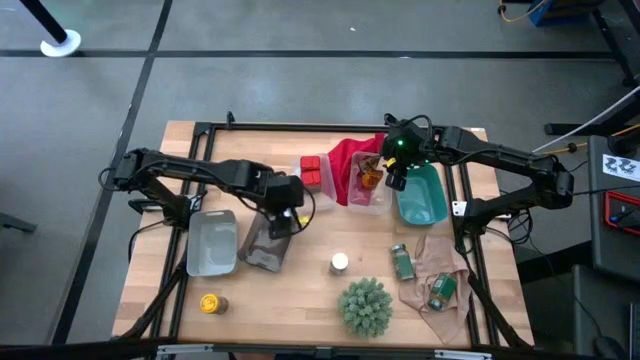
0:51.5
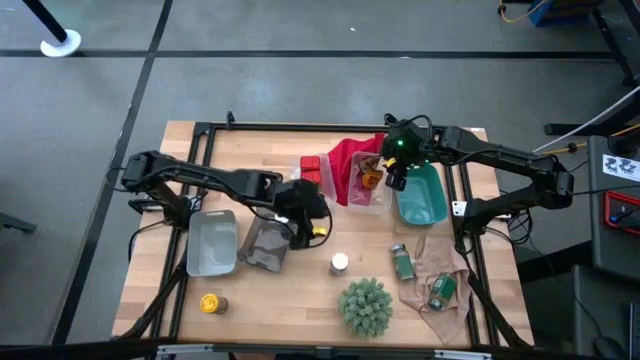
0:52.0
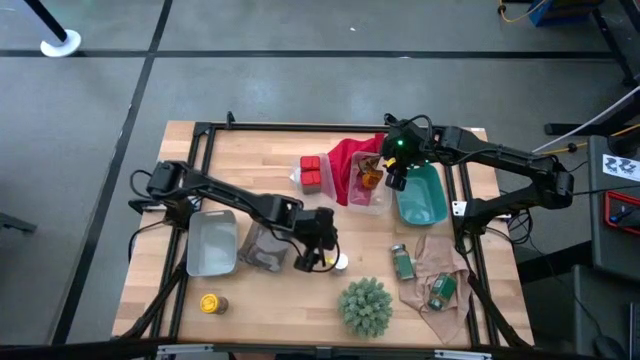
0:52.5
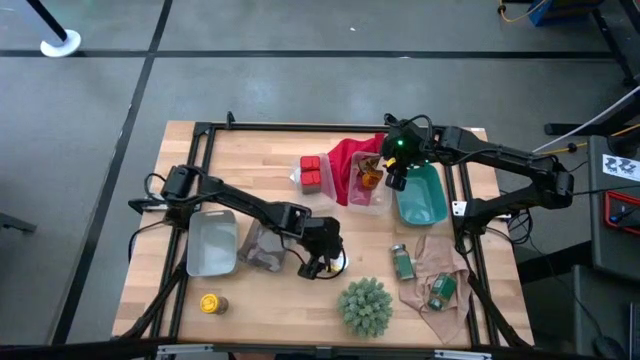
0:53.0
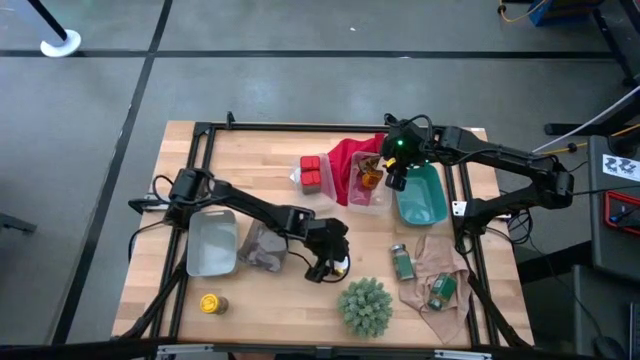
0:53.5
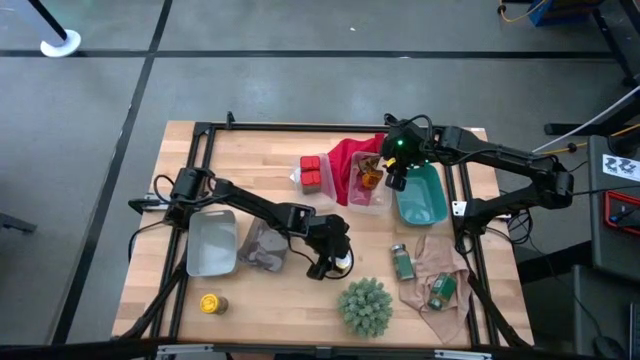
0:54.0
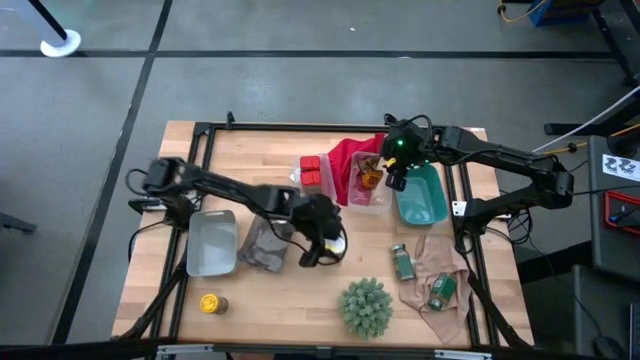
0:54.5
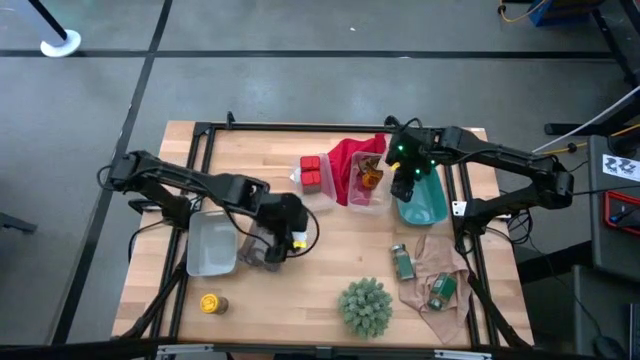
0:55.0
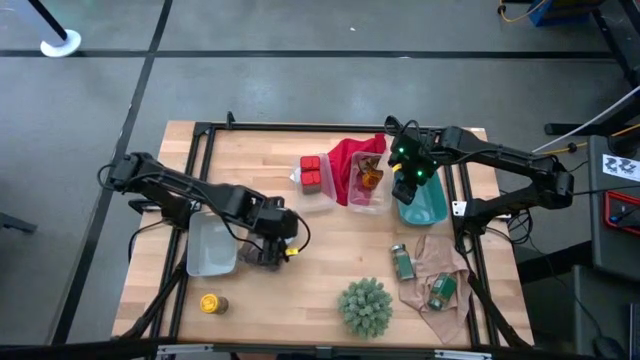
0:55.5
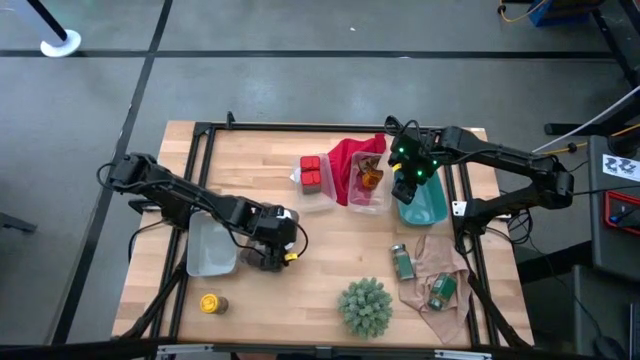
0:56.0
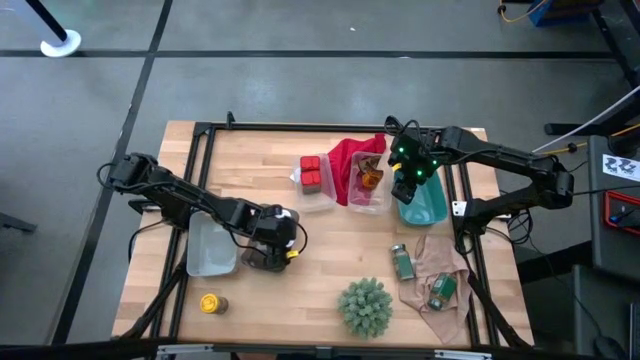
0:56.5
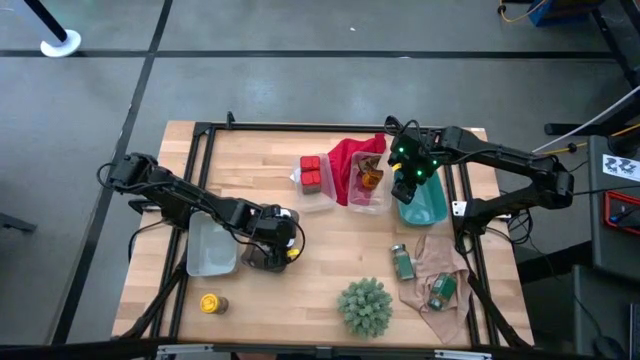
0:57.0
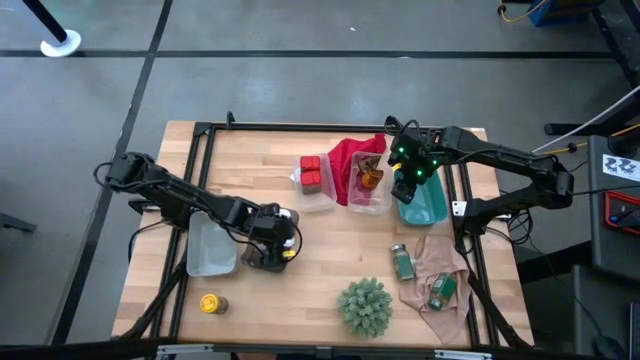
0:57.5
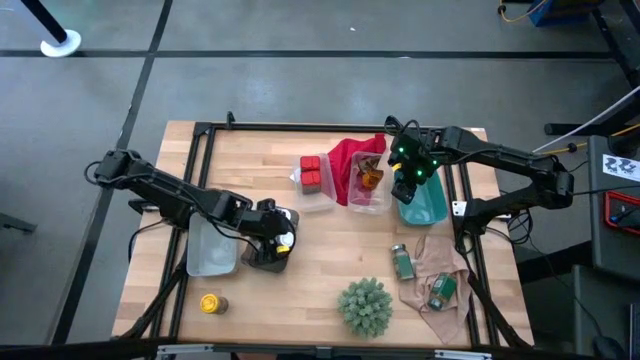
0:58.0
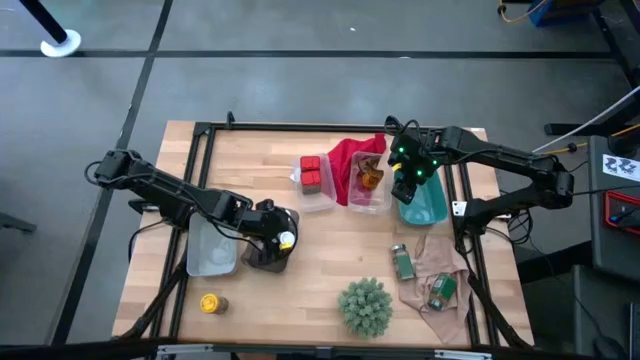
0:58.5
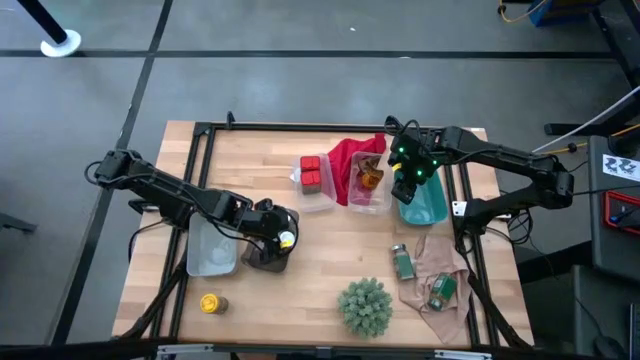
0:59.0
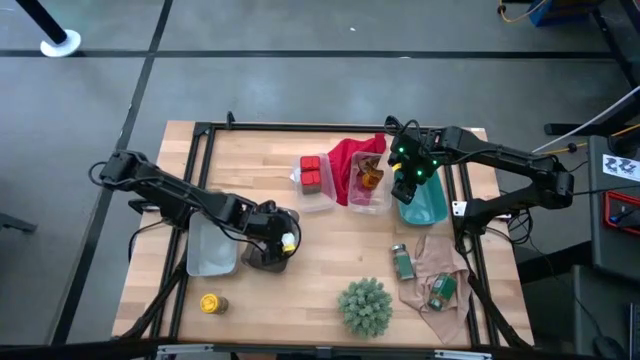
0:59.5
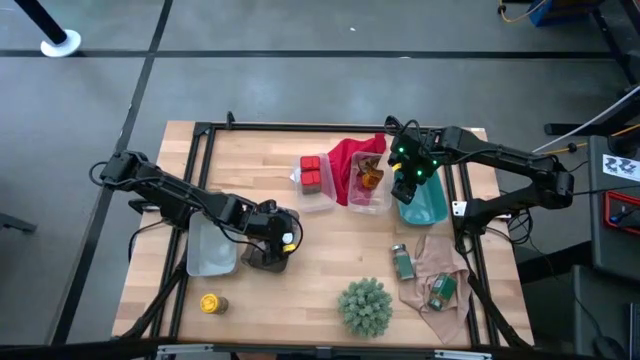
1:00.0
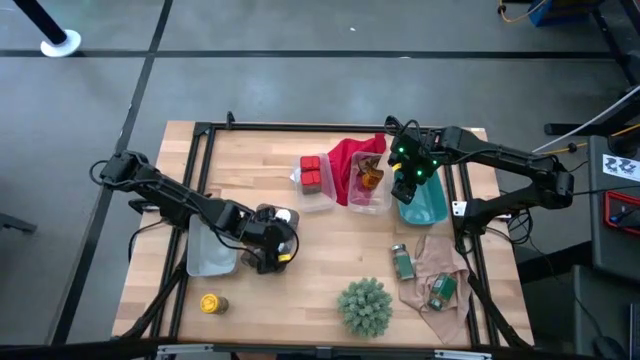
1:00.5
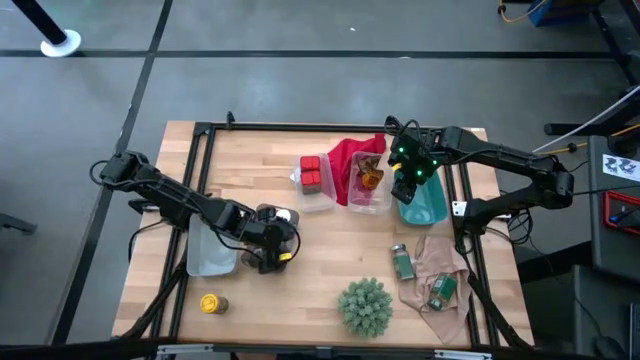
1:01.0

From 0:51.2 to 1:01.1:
Task: Sort spices by type
Put the white seasoning bottle into the black bin

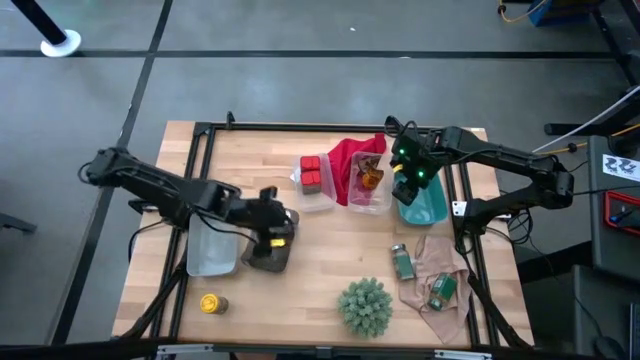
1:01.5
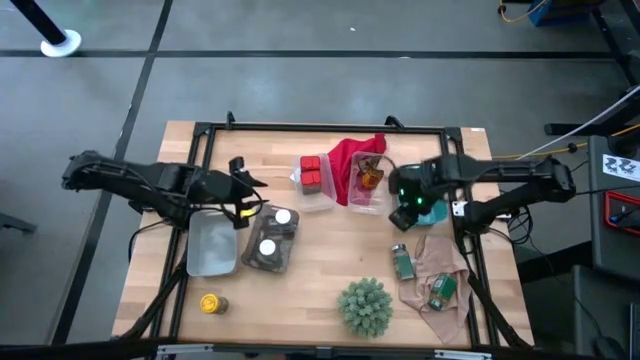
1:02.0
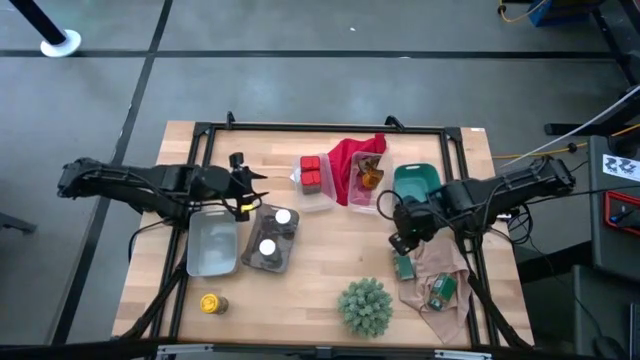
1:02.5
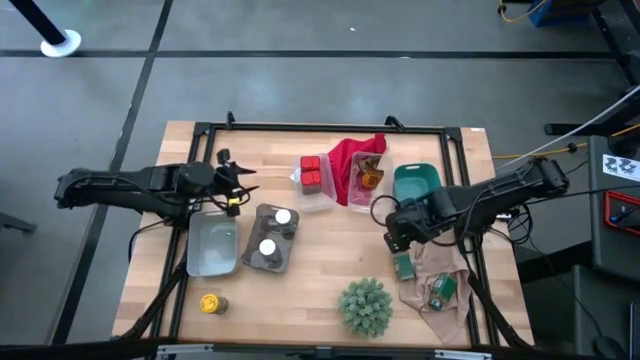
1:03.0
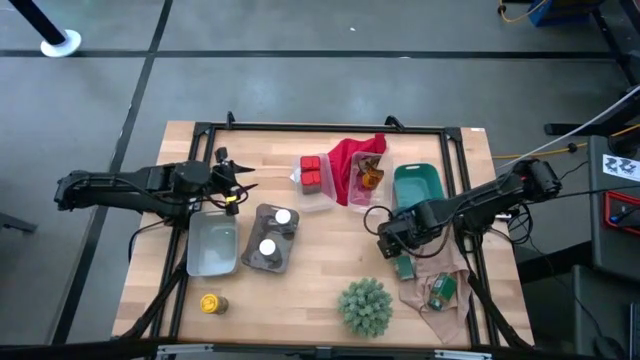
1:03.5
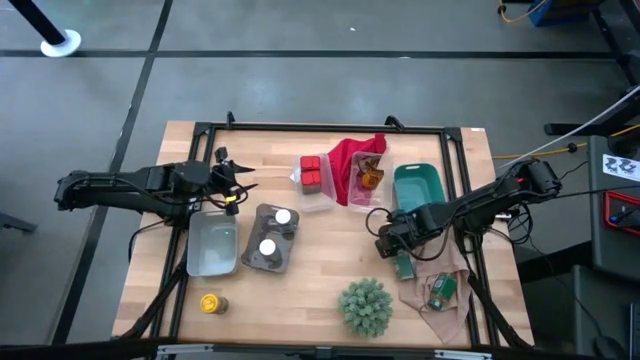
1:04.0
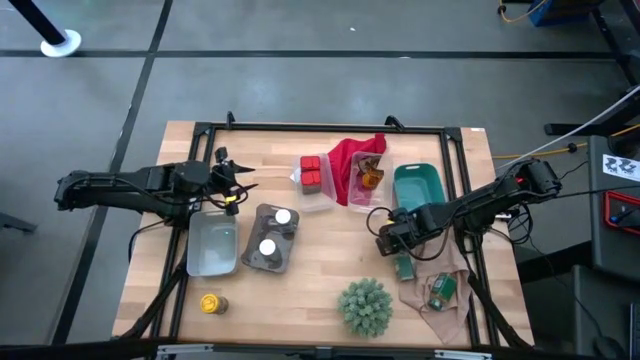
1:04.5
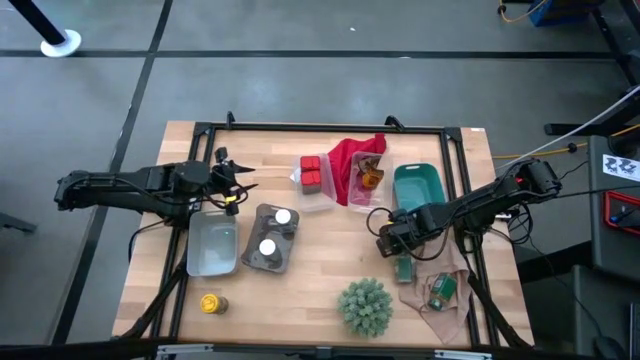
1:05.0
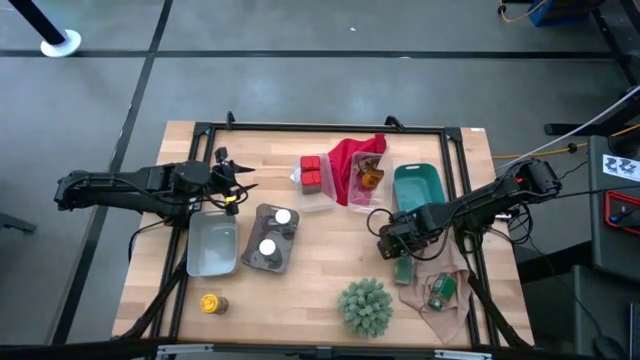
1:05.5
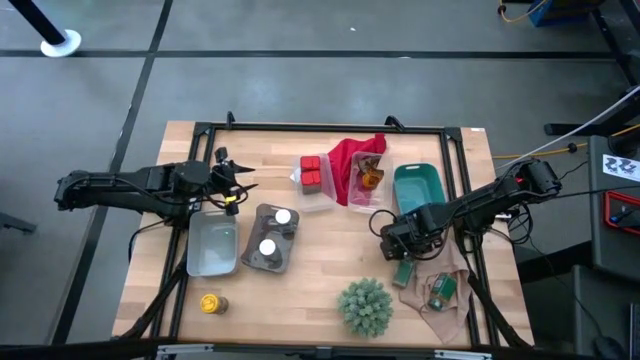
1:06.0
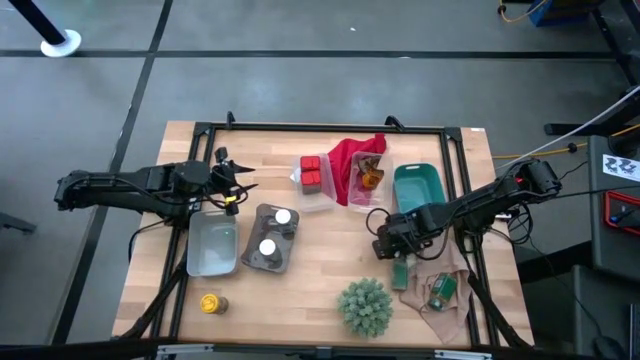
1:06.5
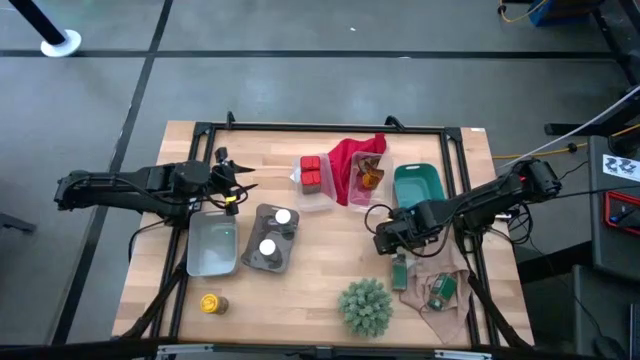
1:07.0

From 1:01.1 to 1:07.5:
Put the left green seasoning bottle into the green bin

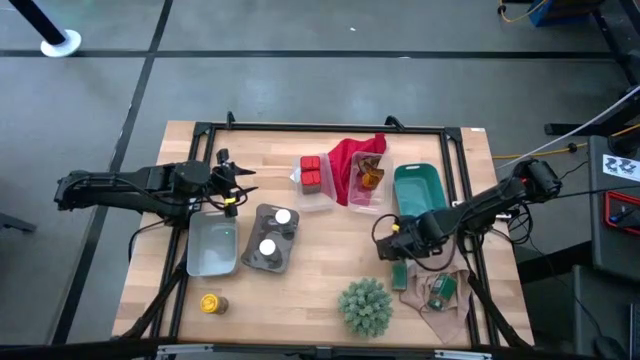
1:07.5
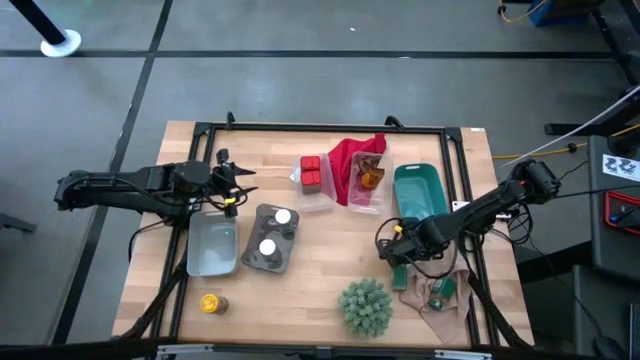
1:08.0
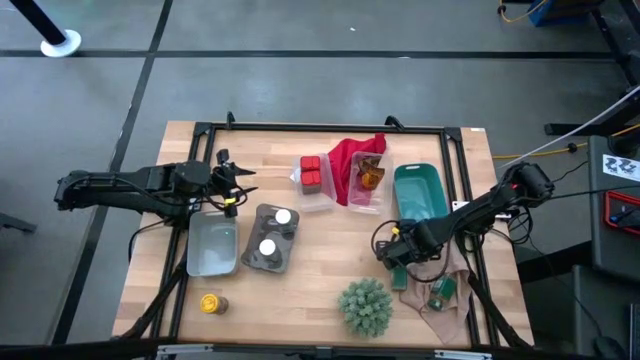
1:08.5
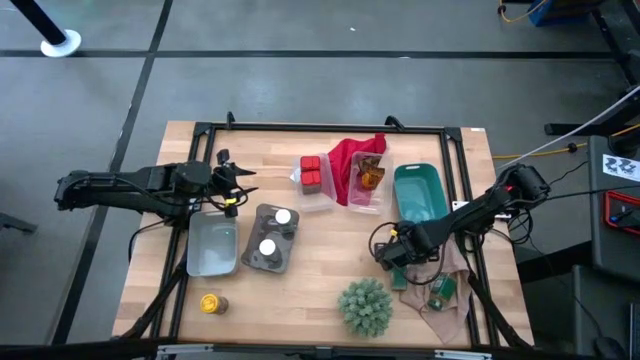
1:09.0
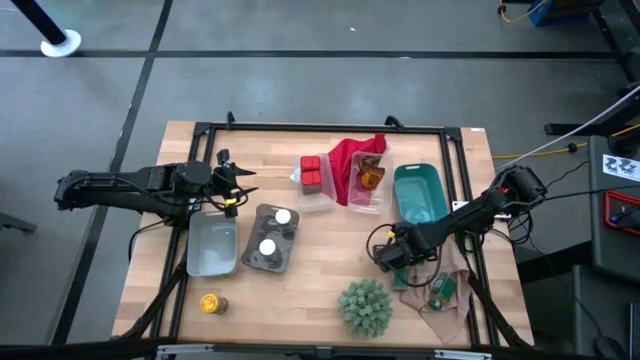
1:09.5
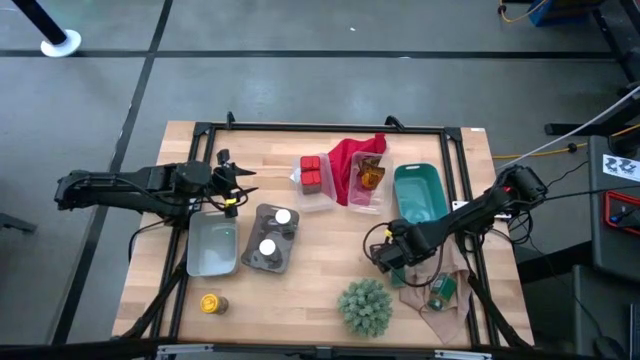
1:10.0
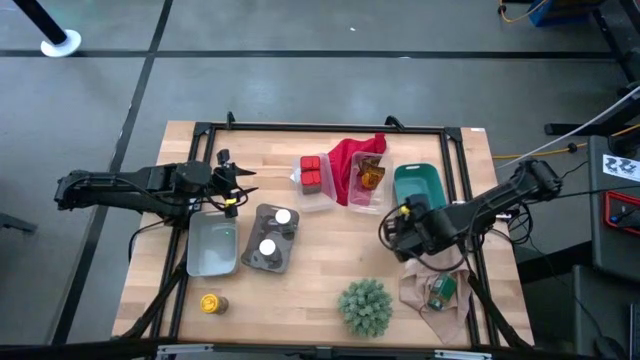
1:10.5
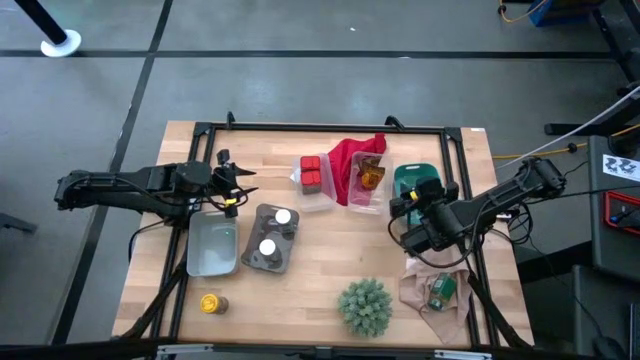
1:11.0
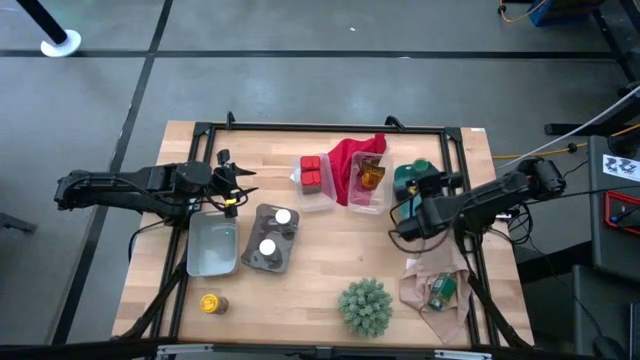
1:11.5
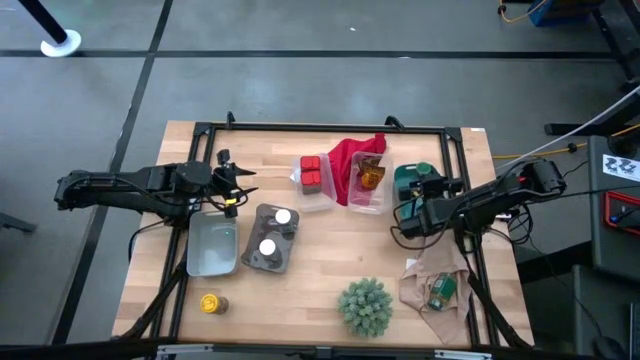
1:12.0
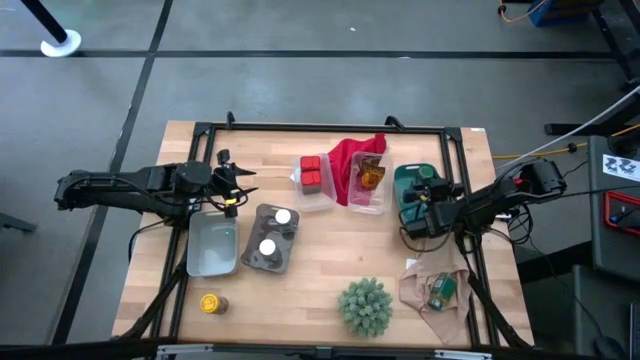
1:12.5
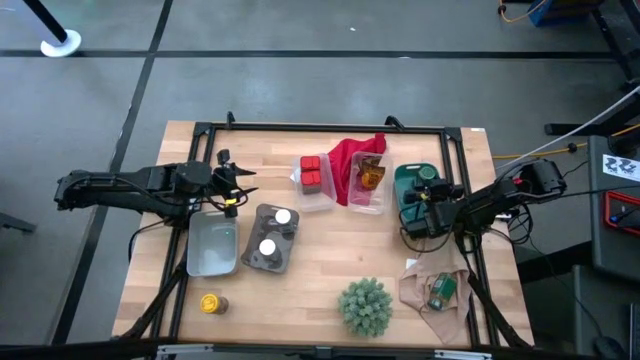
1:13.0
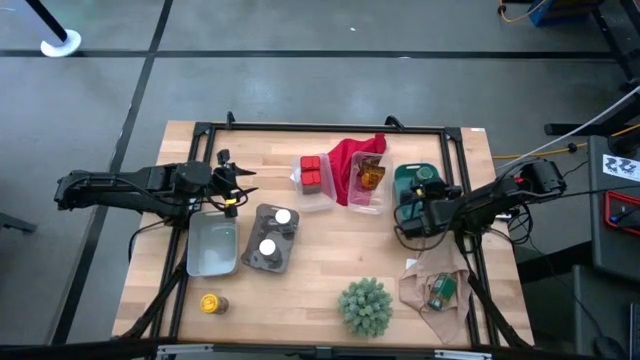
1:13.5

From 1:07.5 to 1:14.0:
Put the left green seasoning bottle into the green bin
